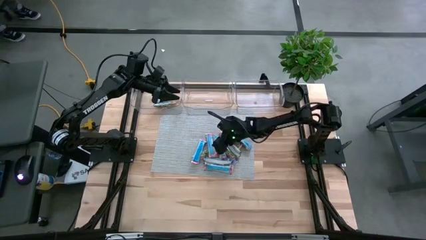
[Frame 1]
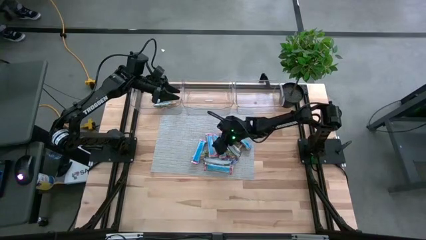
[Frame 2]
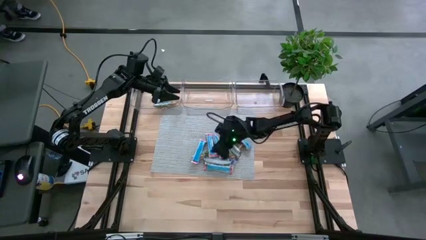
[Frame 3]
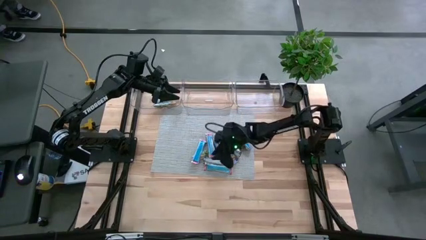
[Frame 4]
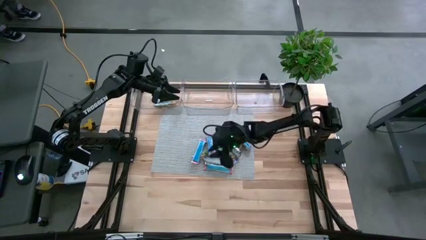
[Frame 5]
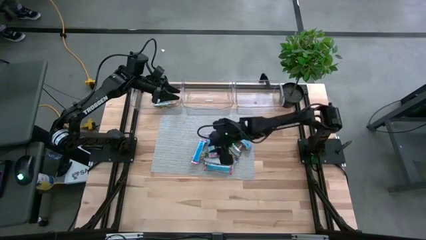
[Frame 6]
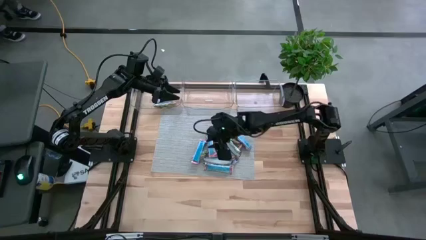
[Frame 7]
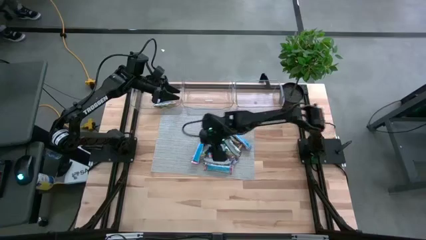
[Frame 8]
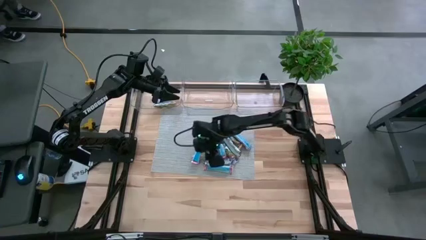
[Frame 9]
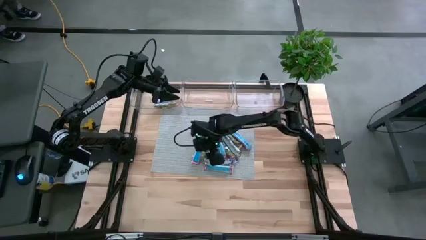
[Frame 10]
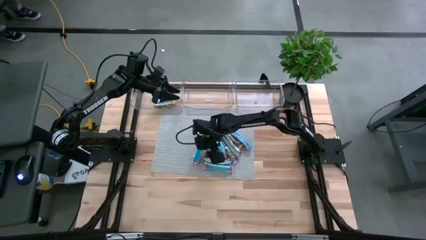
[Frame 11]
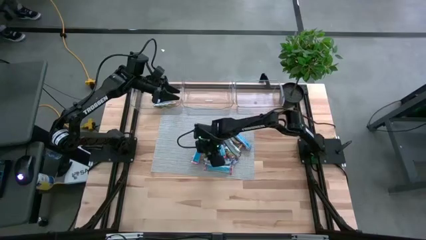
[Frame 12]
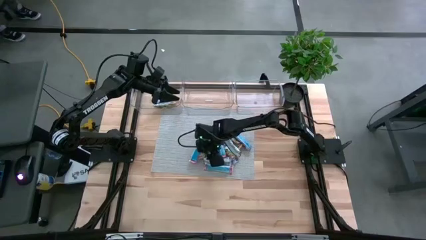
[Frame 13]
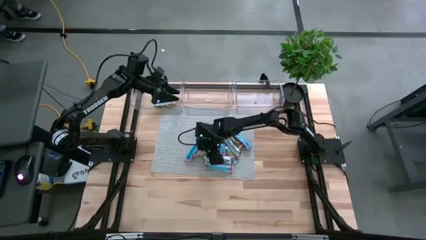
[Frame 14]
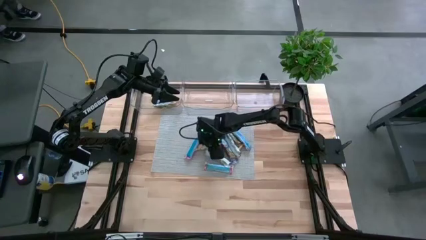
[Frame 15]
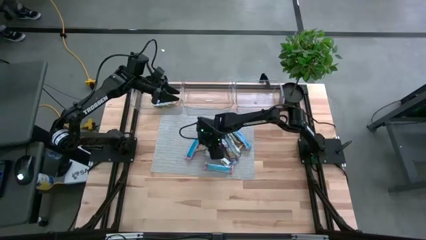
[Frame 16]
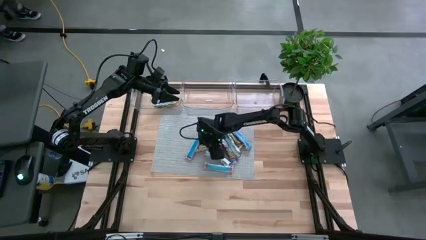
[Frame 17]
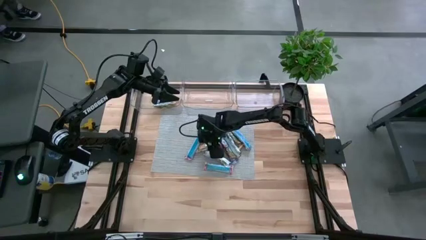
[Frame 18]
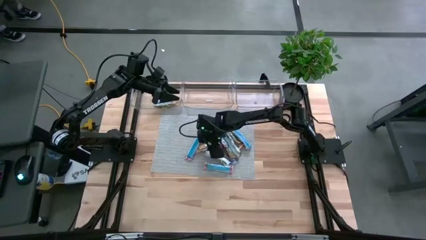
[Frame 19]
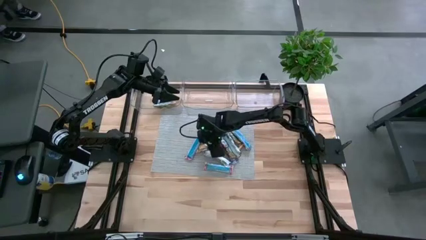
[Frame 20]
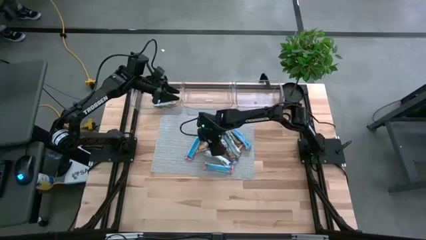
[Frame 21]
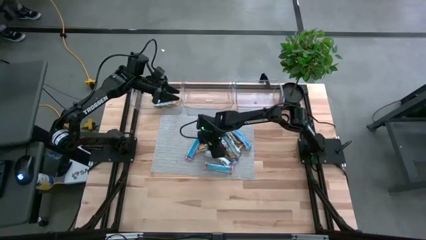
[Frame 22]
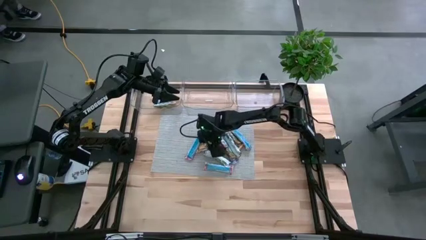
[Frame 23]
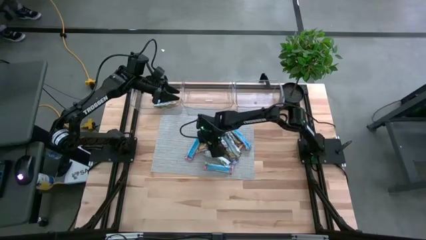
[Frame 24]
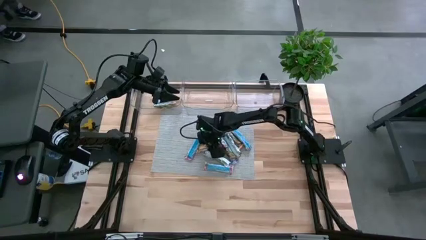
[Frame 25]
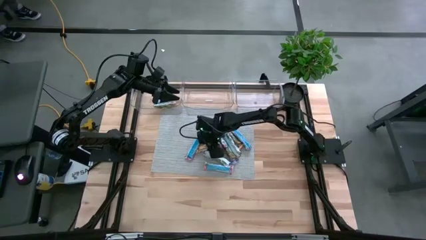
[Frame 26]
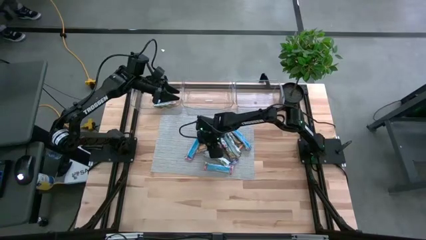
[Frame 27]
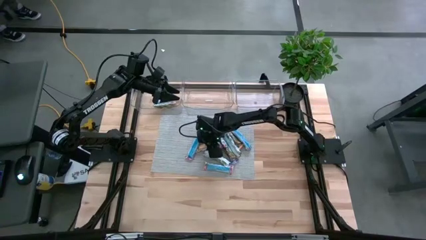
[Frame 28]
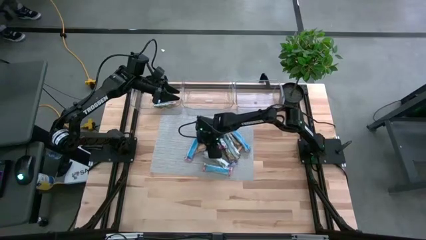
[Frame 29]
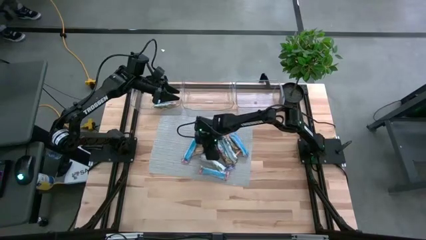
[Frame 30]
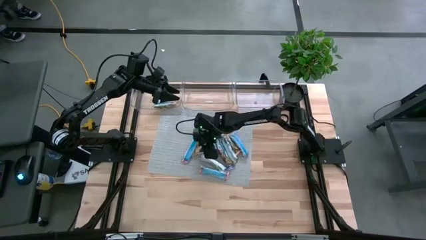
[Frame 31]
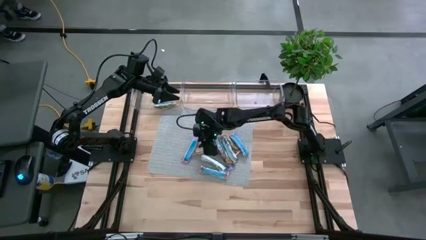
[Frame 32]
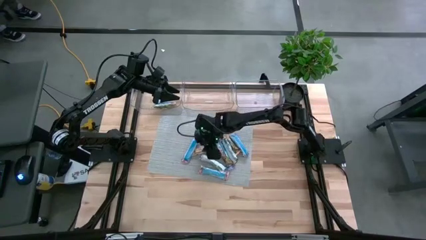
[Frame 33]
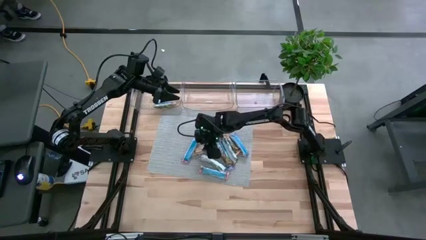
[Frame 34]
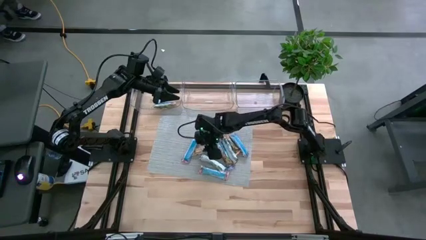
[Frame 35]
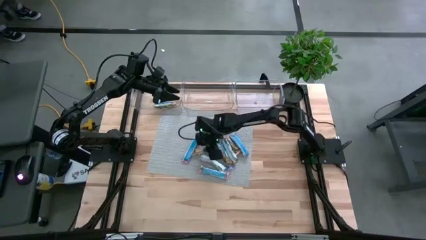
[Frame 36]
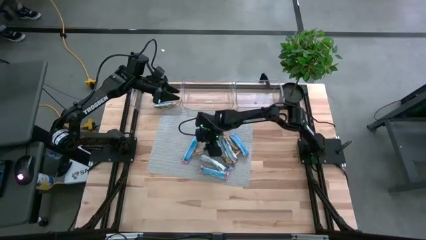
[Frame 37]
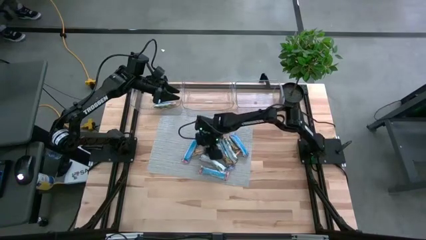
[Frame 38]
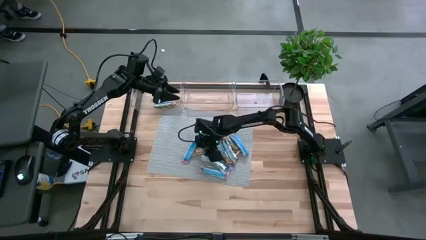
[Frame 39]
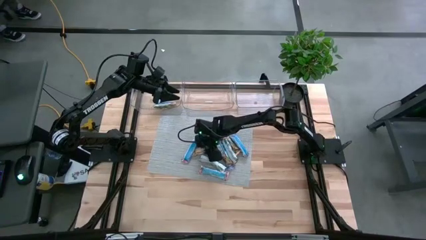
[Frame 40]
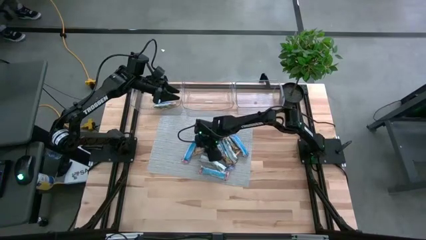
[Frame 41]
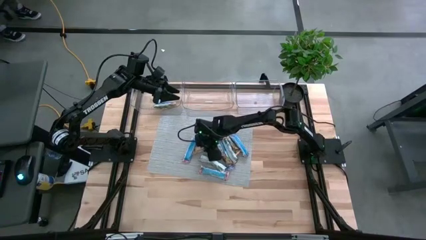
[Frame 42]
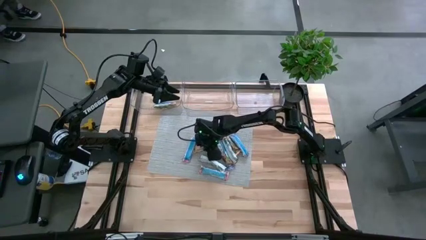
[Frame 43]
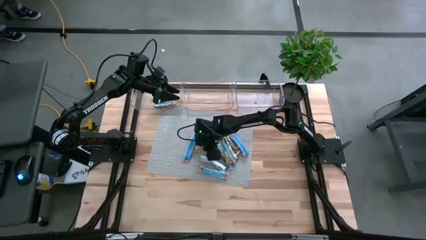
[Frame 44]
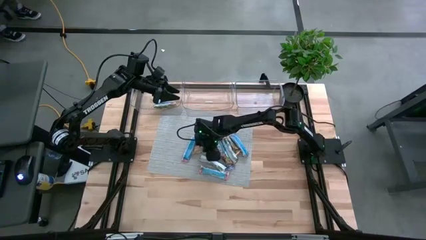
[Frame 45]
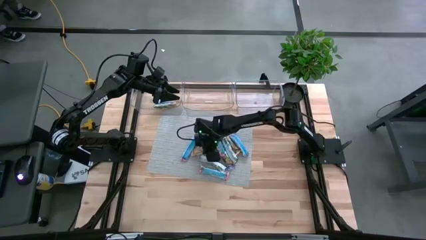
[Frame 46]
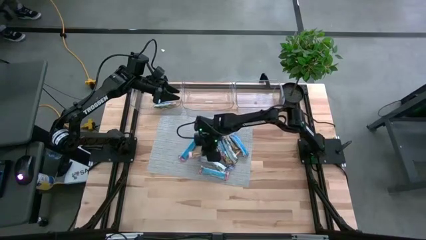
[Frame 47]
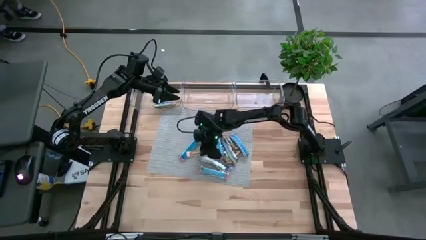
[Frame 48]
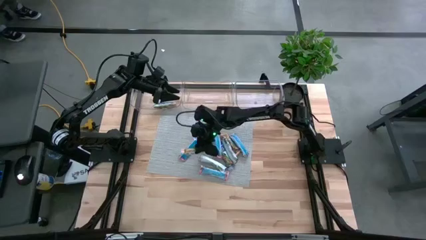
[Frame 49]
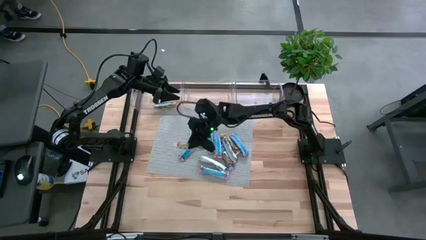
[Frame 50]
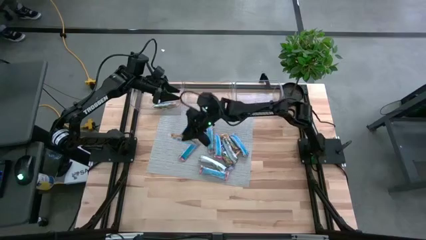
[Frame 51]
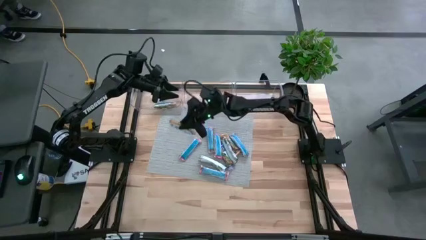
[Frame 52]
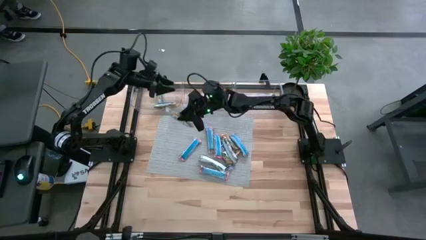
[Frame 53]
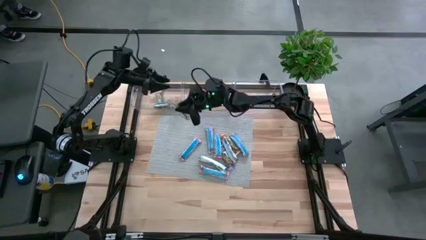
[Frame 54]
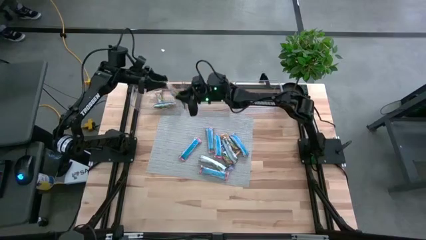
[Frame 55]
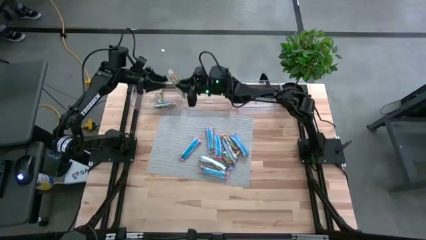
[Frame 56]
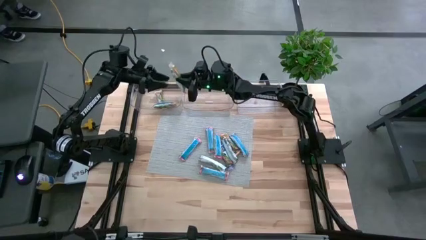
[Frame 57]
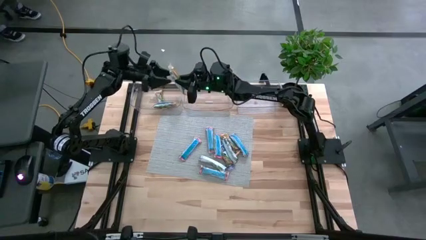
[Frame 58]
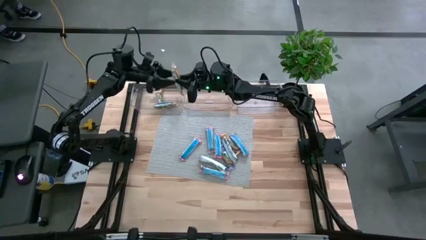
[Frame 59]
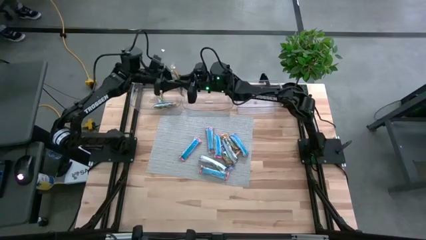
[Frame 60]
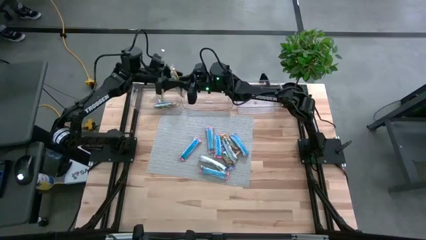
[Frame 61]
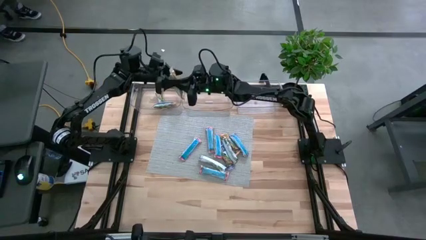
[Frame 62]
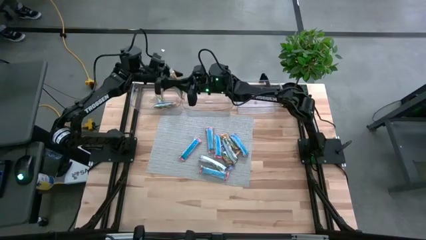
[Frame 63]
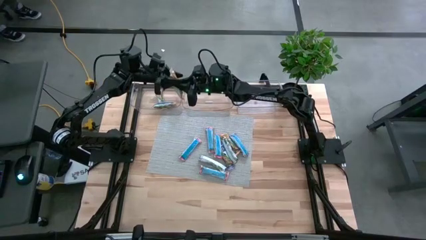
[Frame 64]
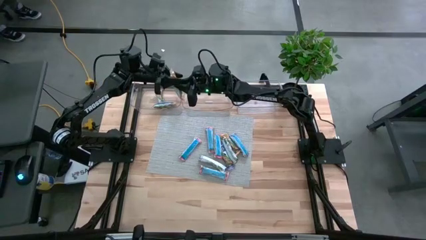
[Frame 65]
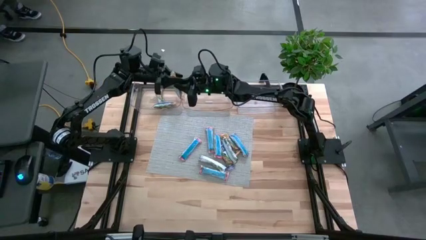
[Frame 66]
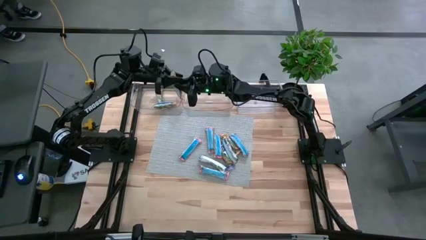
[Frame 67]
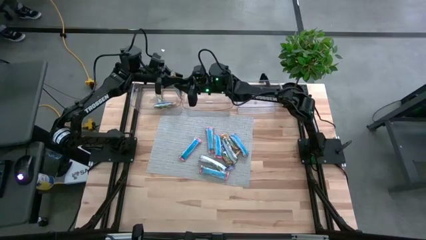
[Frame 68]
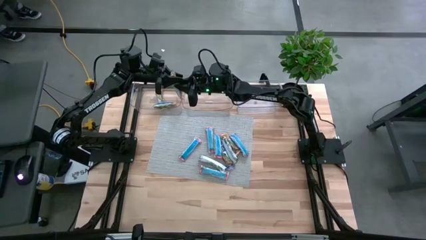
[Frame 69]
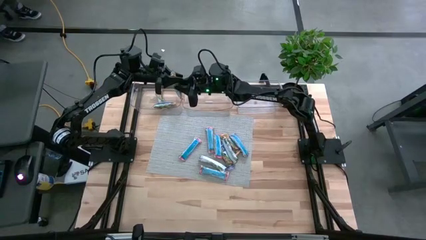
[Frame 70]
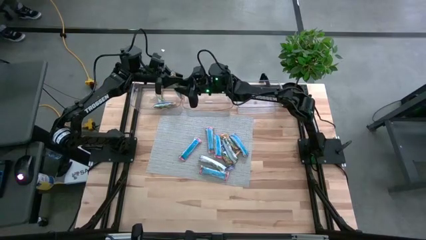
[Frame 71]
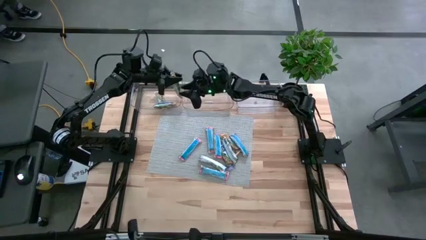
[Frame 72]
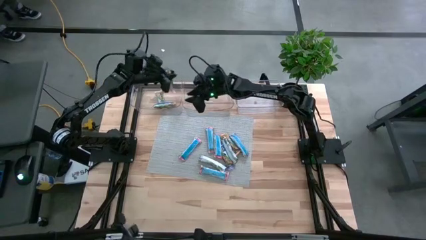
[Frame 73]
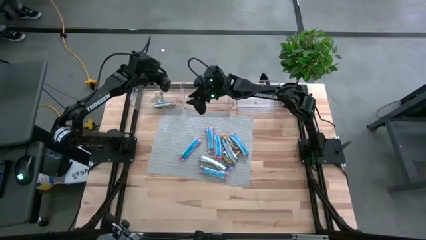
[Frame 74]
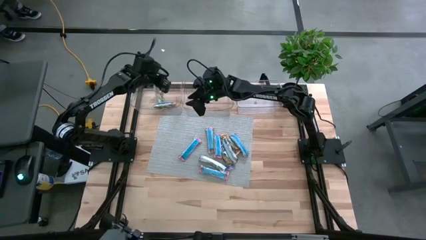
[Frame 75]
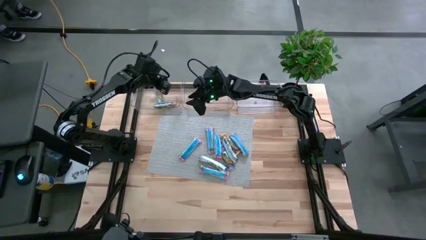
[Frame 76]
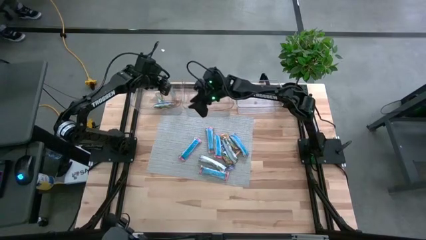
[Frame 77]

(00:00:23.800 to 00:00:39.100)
Task: Pick and place Granola Bars by type
Put the yellow granola bar into the left transparent bin
